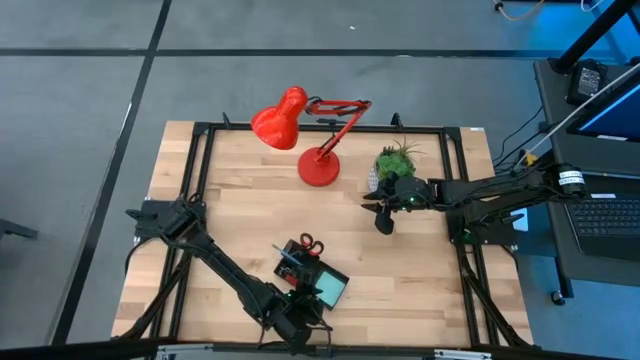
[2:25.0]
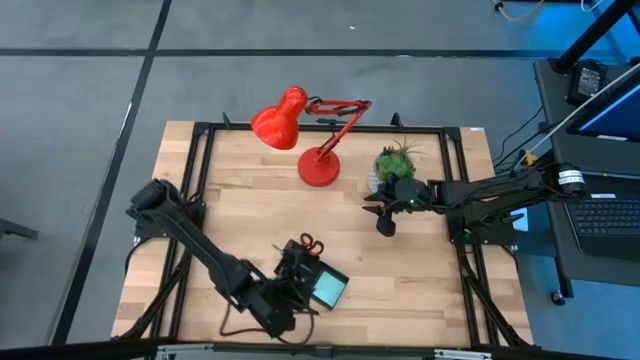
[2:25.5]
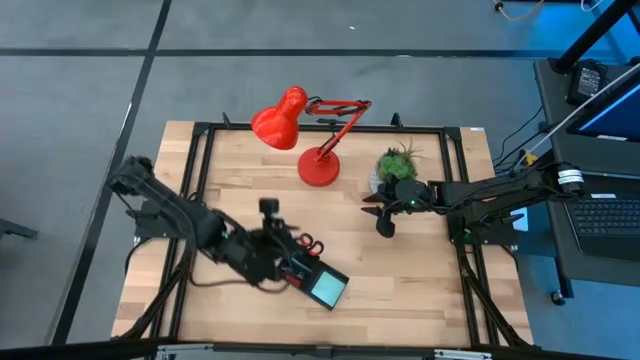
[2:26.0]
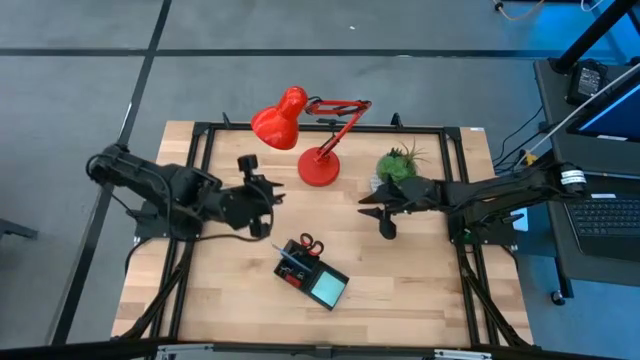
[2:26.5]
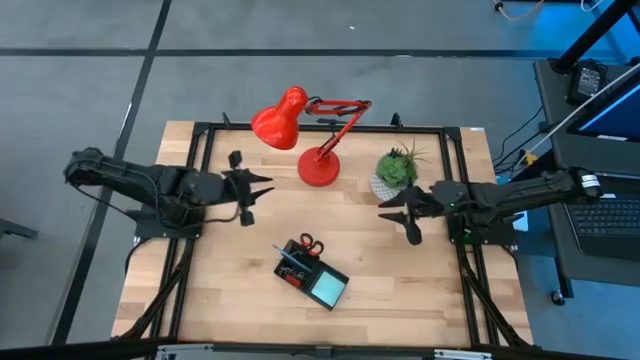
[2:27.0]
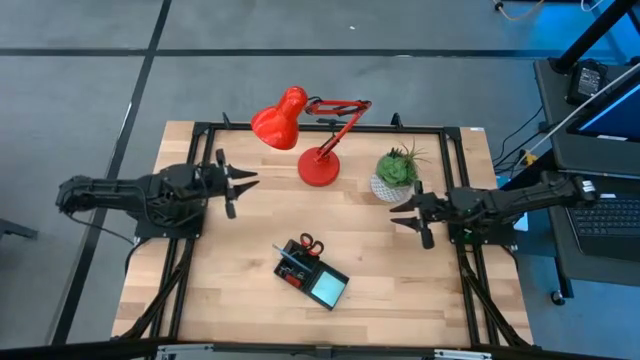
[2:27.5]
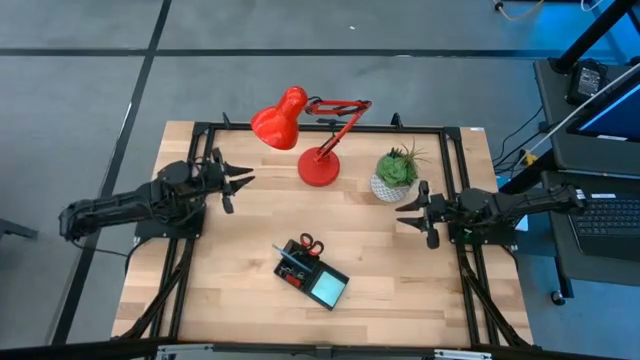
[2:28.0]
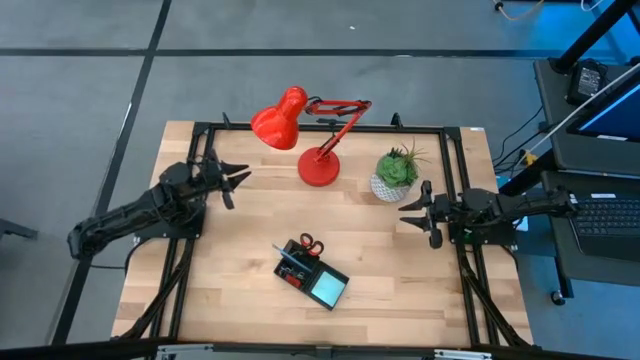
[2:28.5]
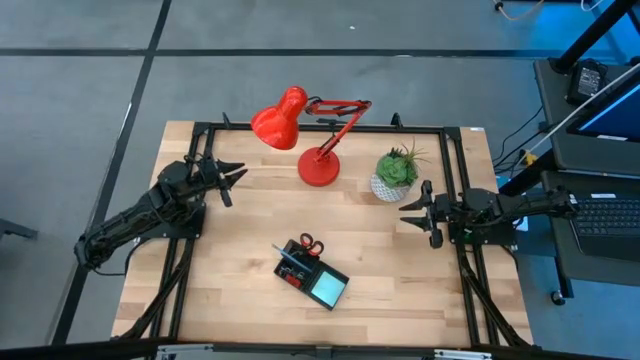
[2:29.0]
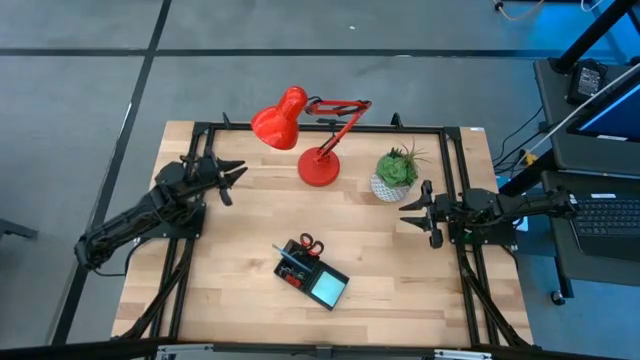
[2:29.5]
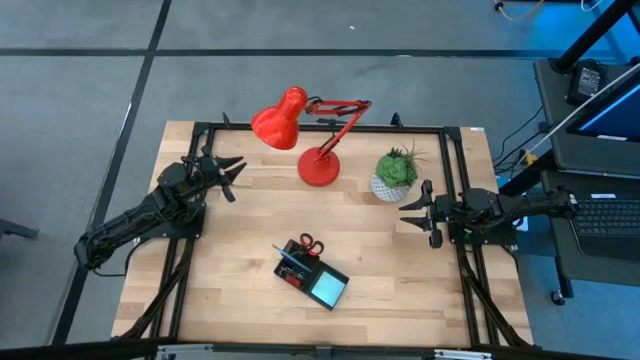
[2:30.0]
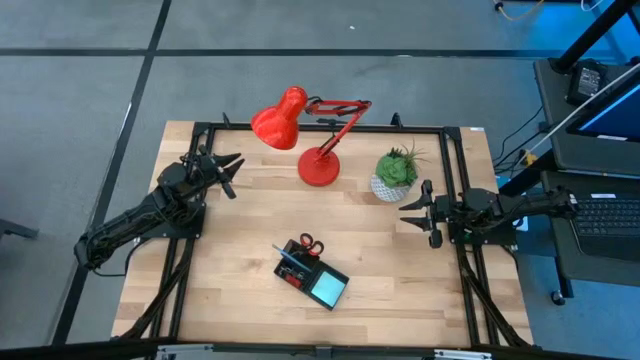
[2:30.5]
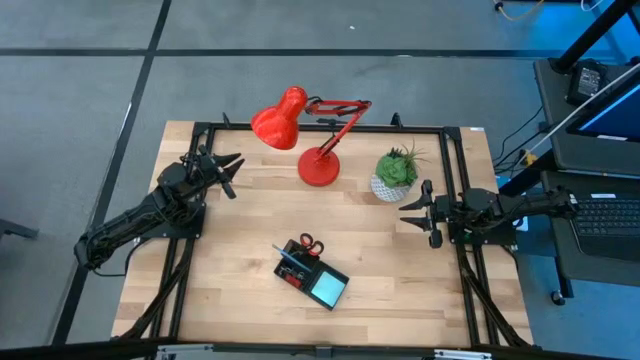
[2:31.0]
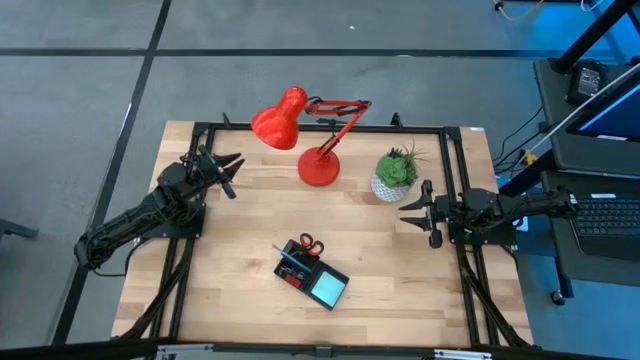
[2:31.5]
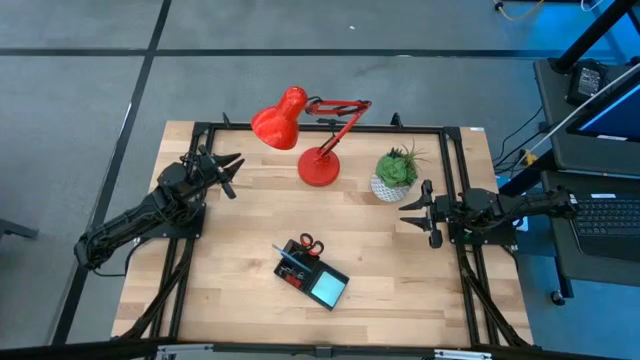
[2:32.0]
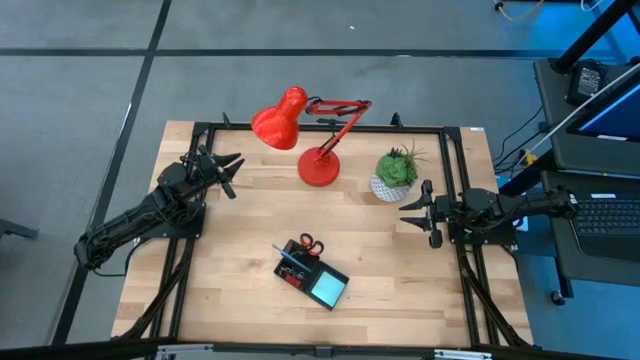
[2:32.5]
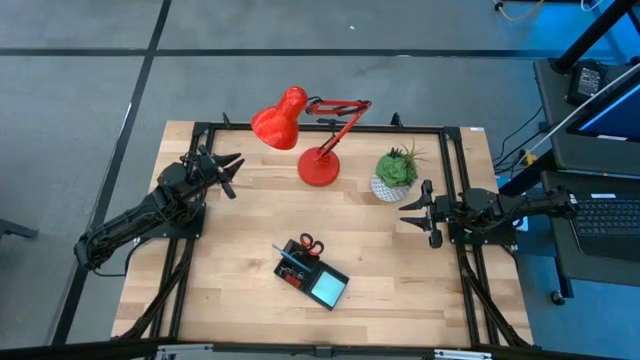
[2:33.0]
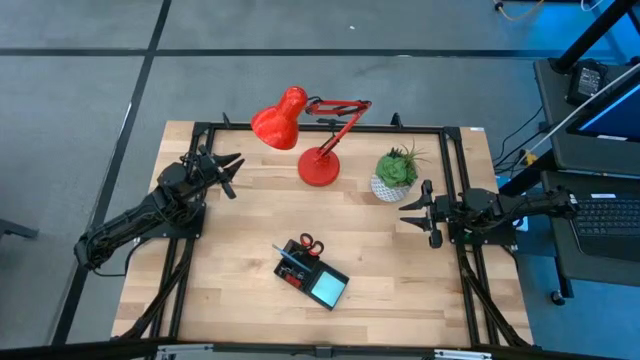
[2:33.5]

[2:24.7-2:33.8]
Task: Pick and place office supplies into organizer
Return to Home Position

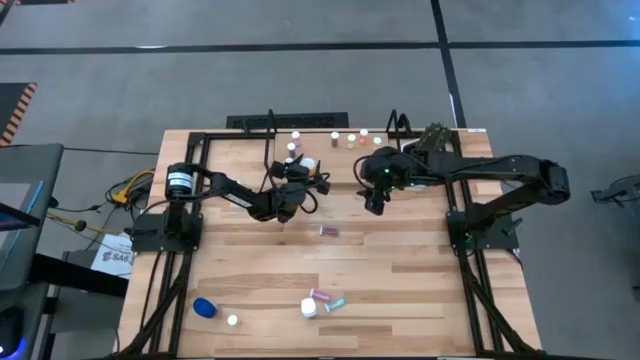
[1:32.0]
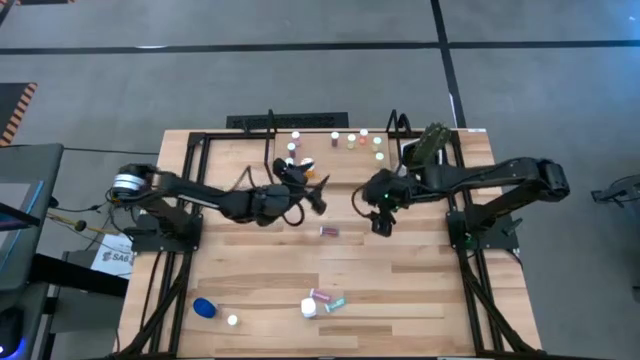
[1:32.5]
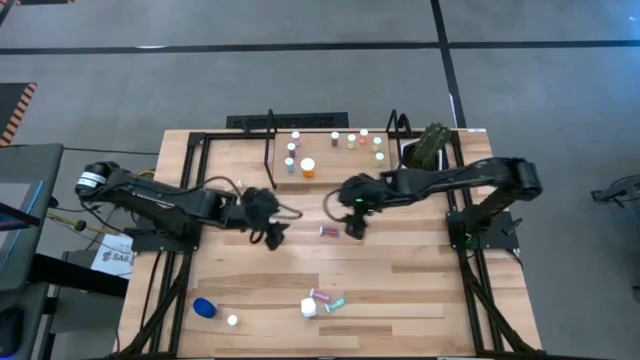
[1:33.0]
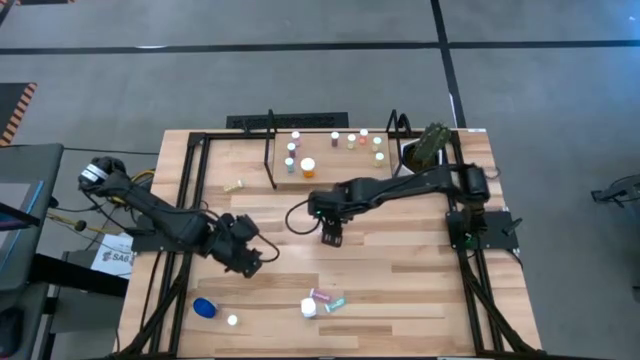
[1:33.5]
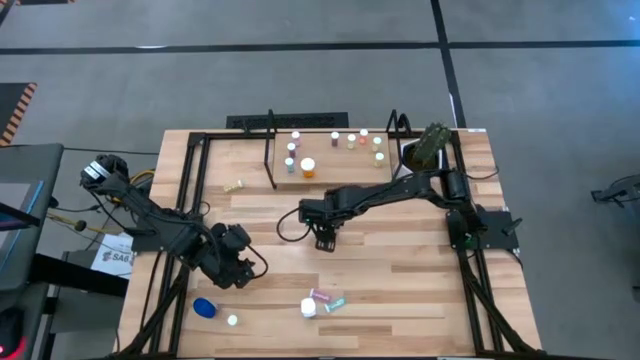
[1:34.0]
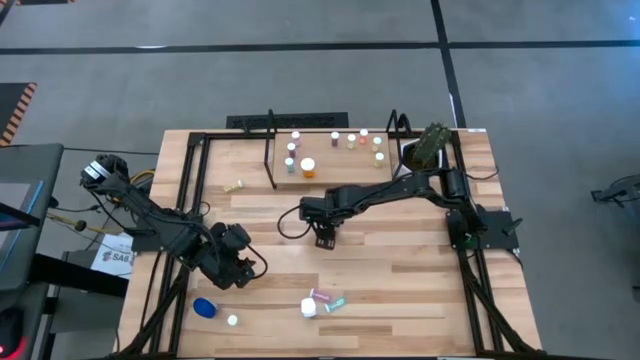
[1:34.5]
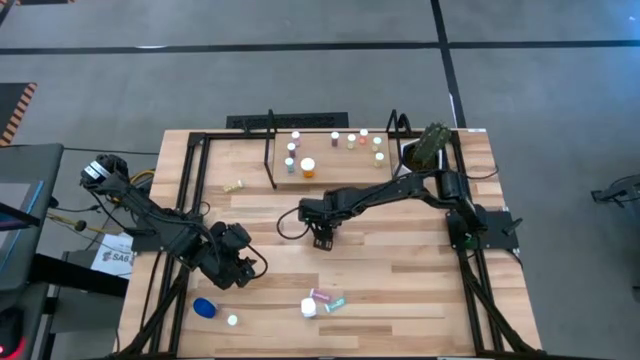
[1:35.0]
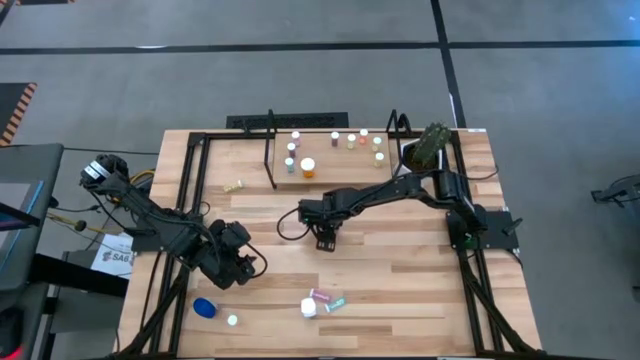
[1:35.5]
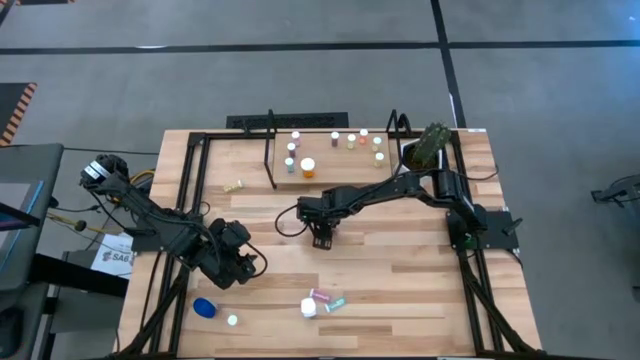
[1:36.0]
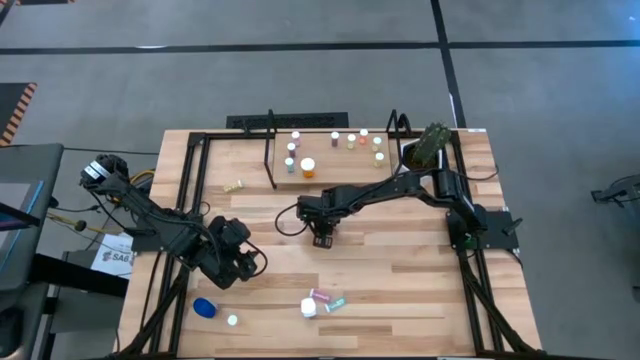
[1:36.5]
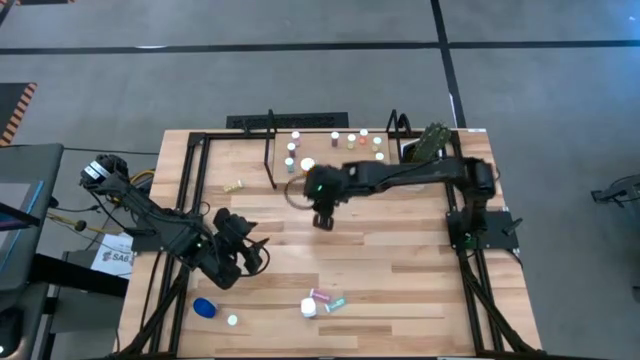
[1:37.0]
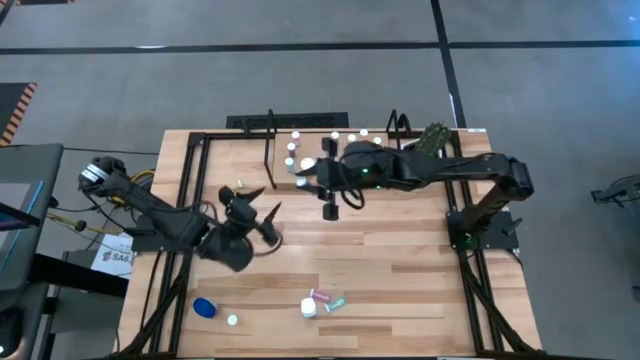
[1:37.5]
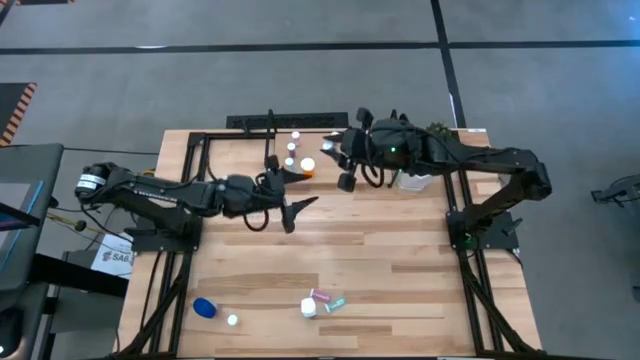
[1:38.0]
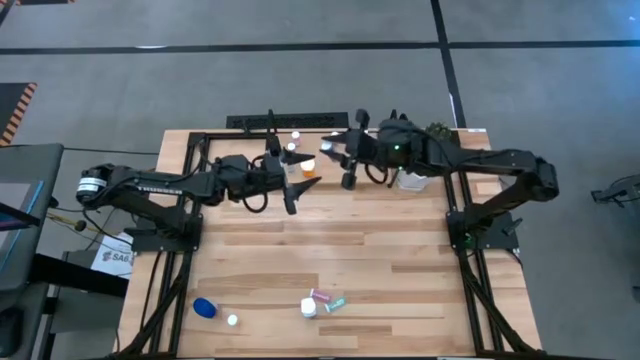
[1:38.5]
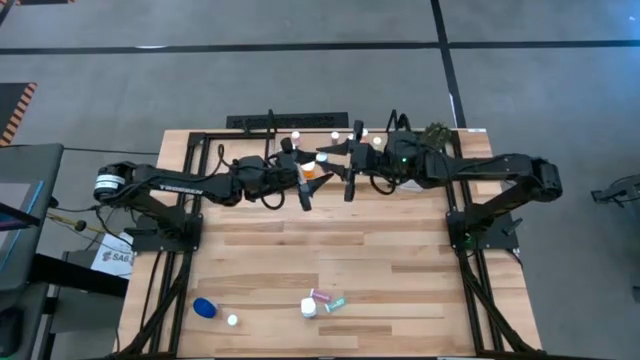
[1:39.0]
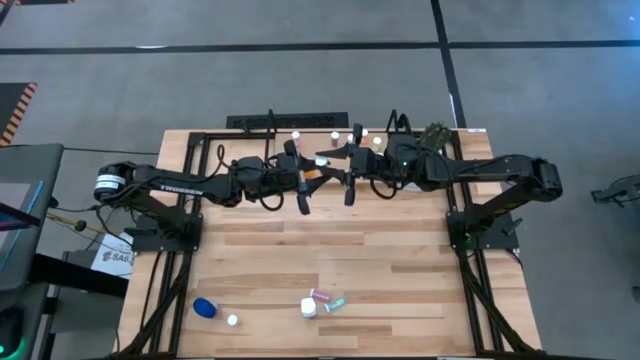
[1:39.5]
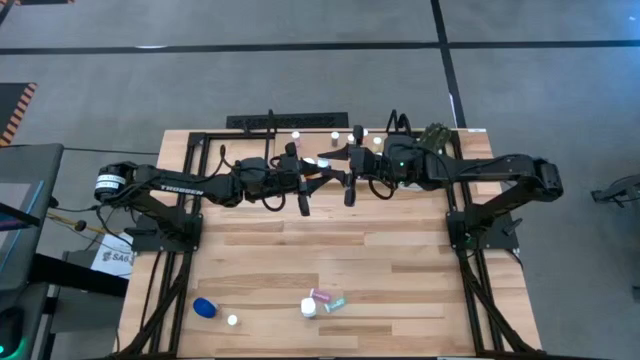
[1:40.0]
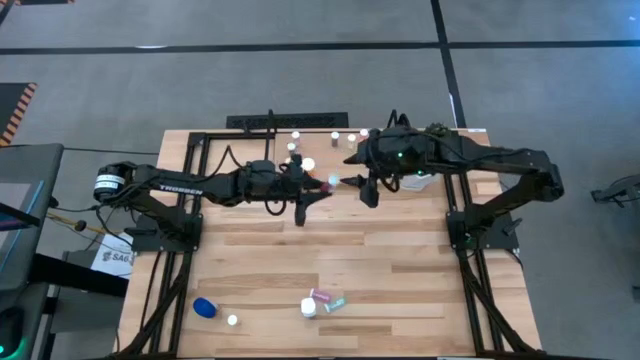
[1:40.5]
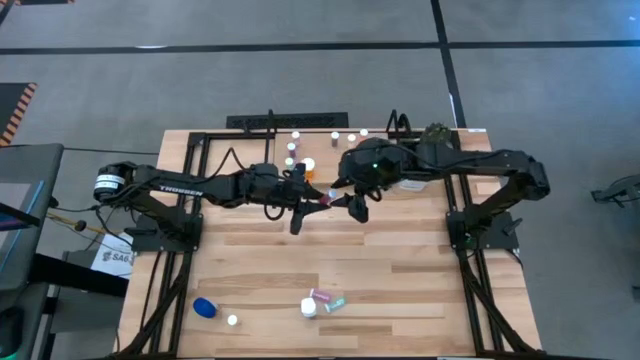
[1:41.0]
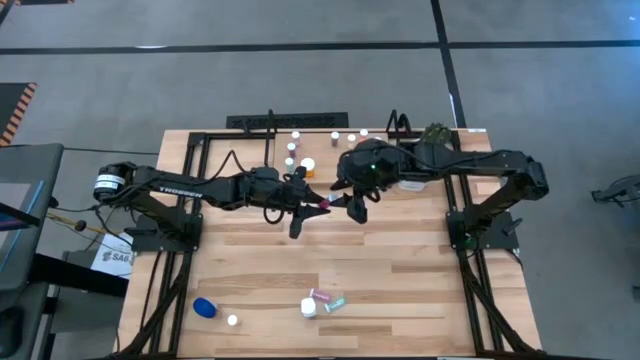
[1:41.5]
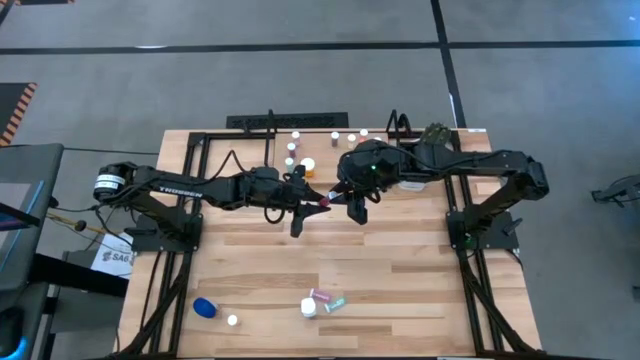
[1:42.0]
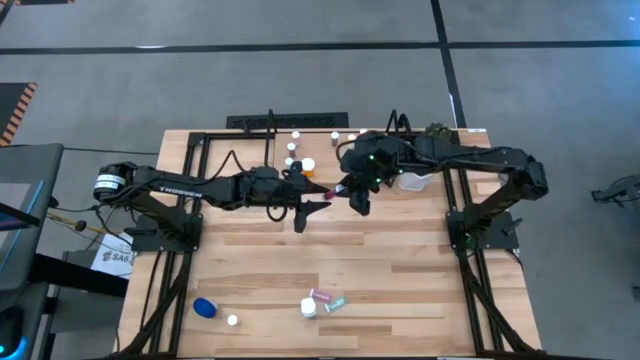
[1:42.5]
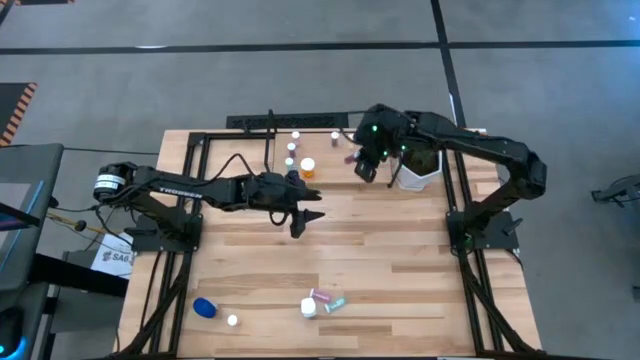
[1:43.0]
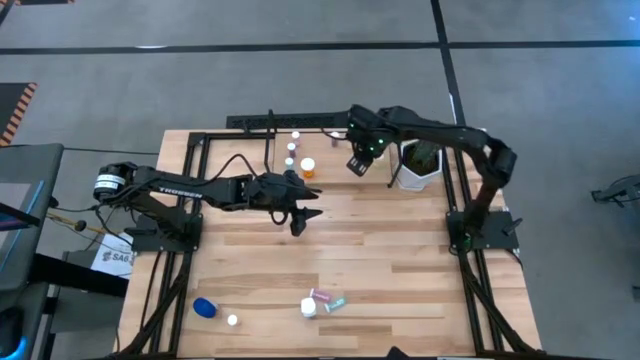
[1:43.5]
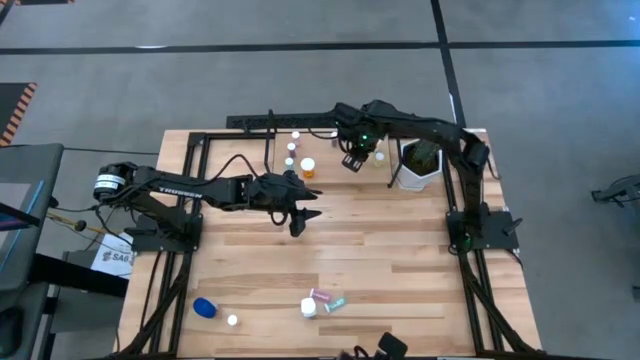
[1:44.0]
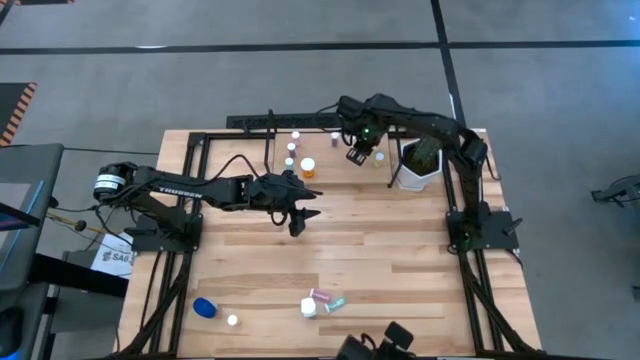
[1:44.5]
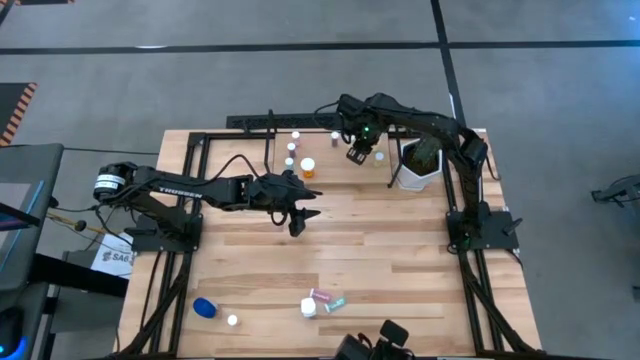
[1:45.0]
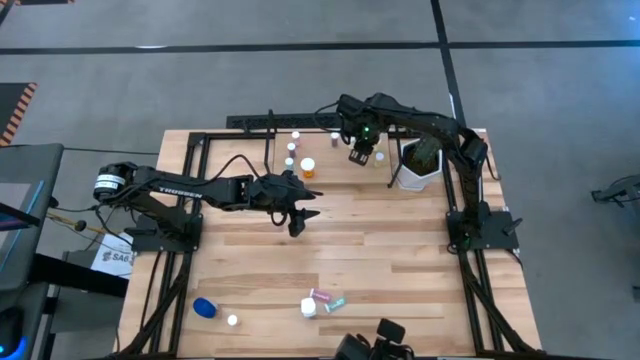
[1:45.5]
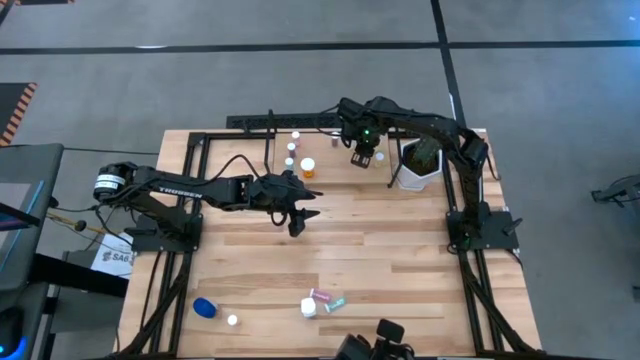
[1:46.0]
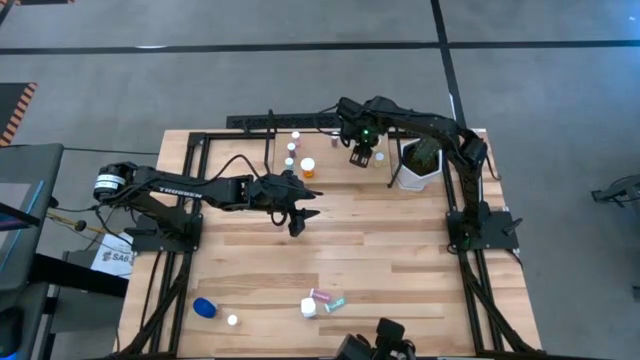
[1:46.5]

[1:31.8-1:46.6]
Task: Pick and place medicine bottles onto shelf by color
Put the blue pill bottle on the shelf
